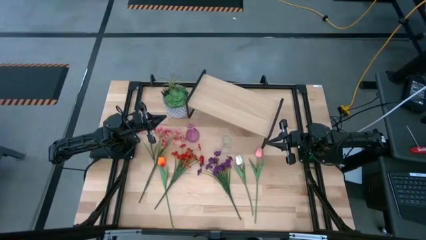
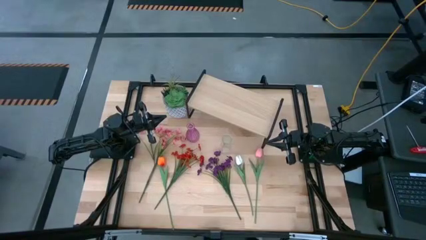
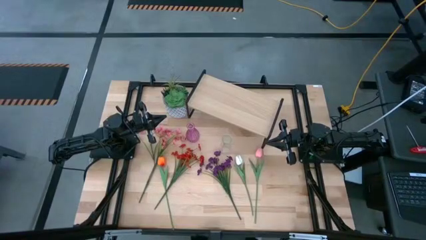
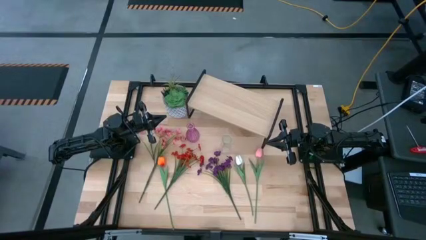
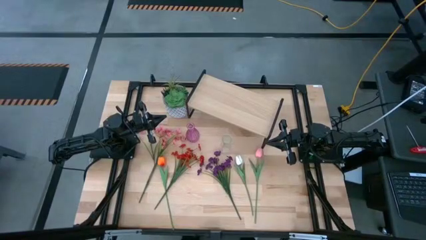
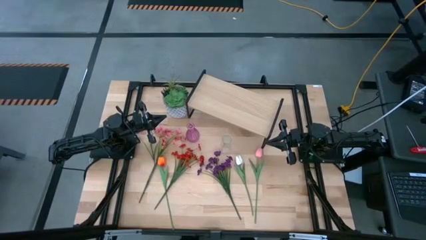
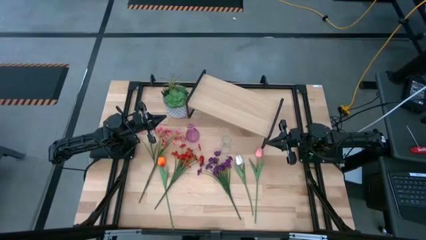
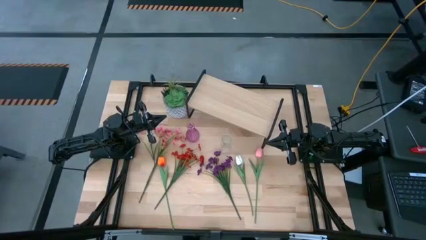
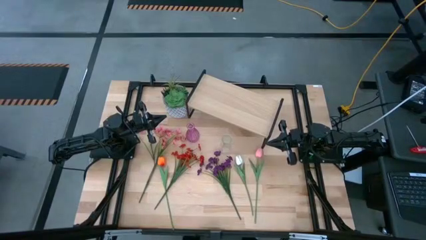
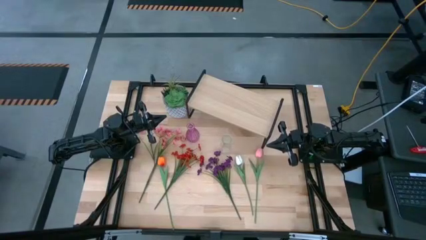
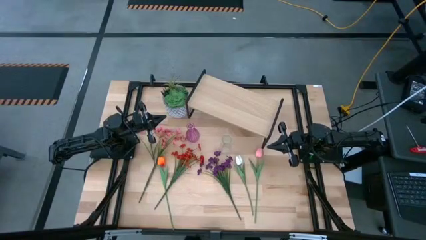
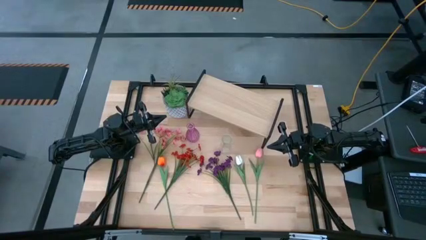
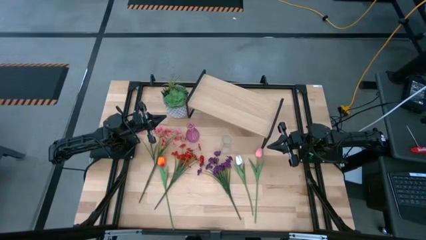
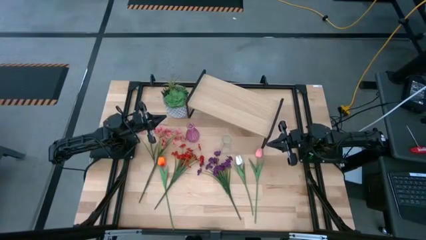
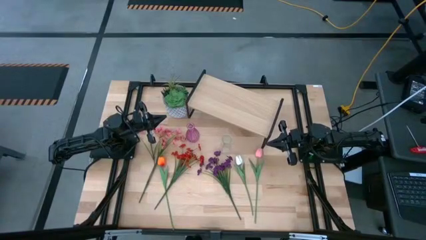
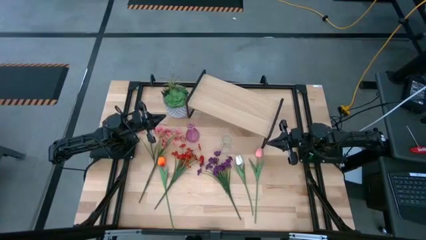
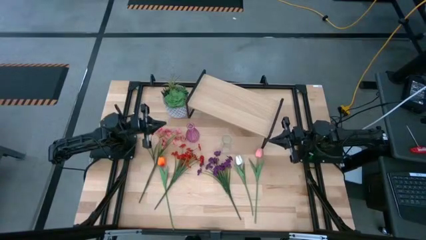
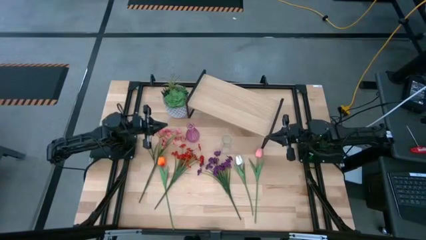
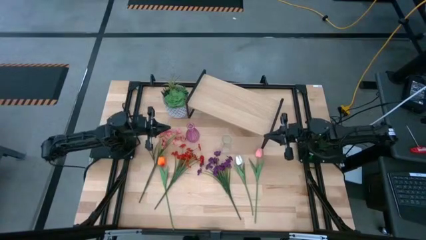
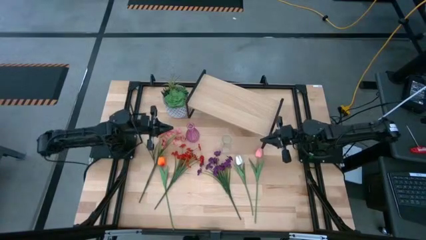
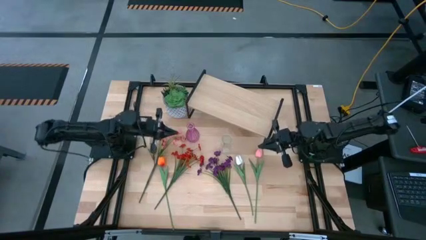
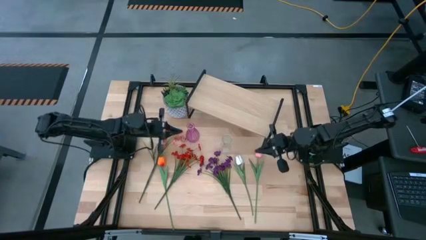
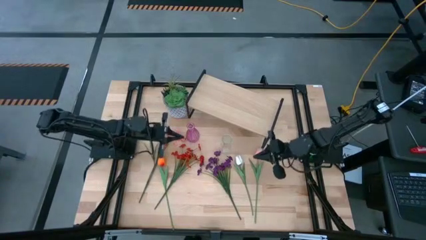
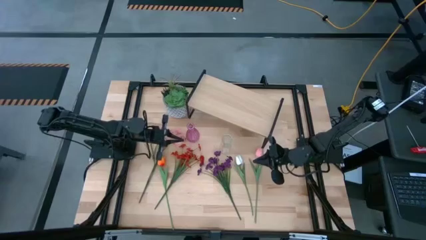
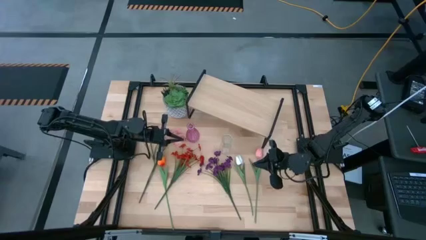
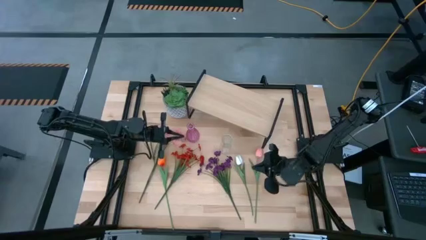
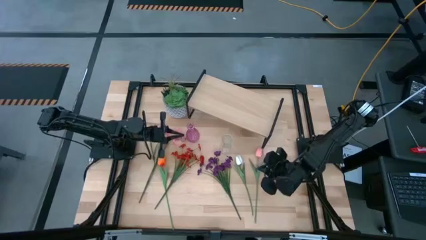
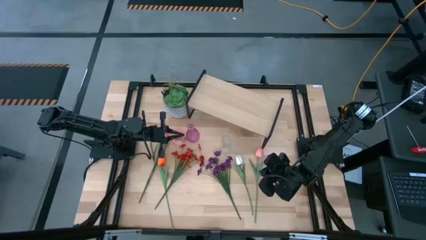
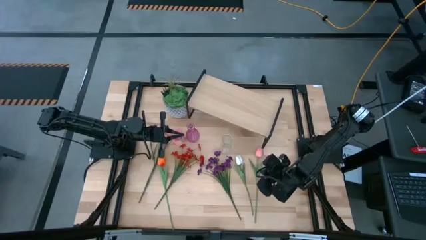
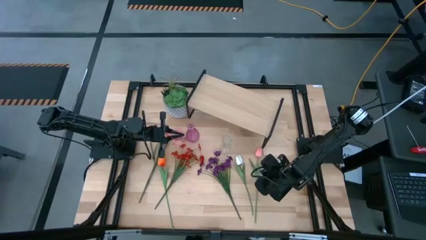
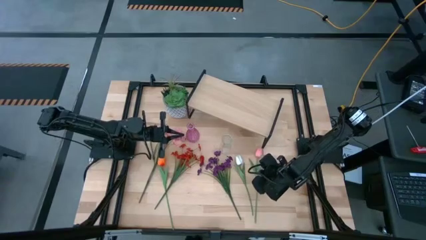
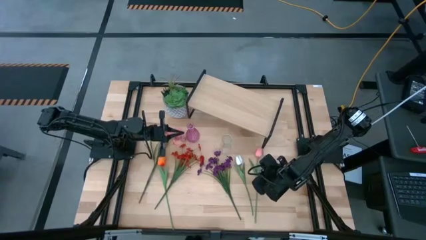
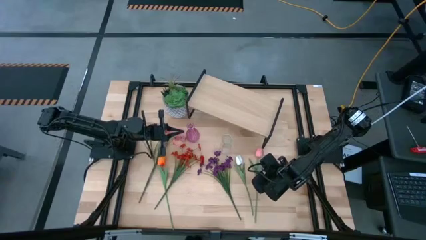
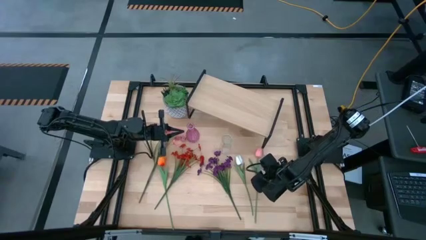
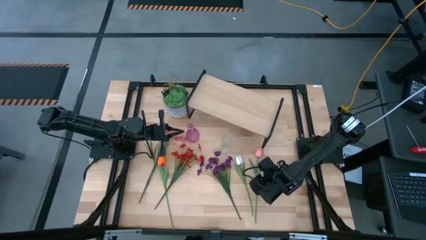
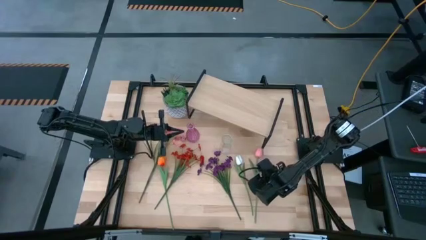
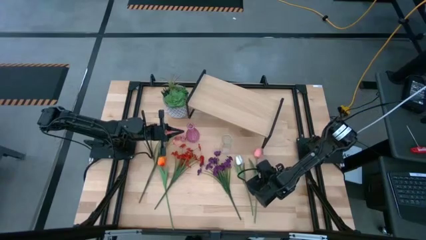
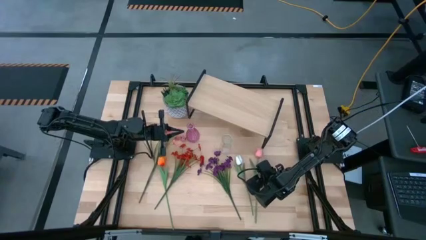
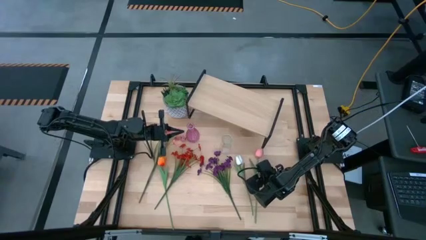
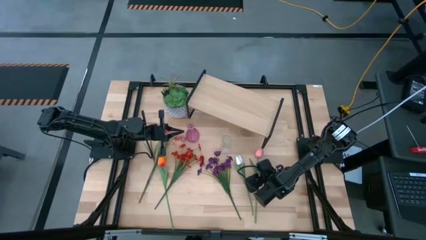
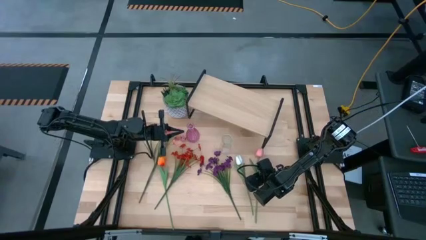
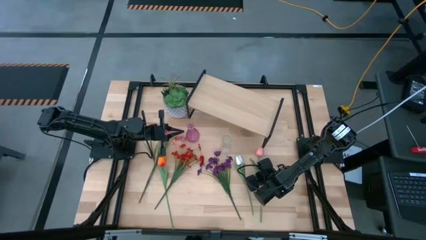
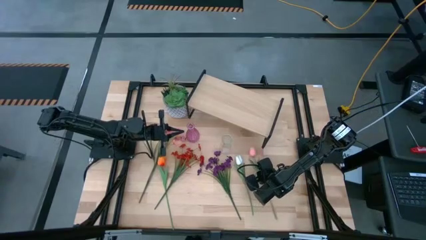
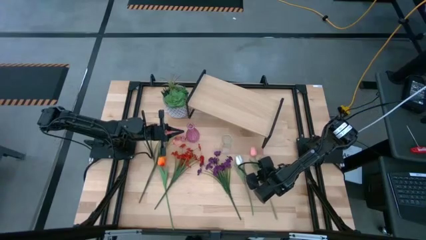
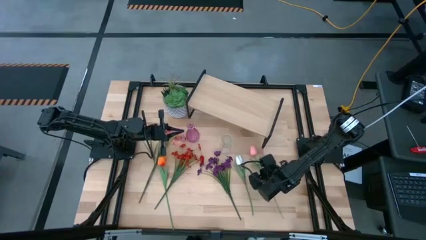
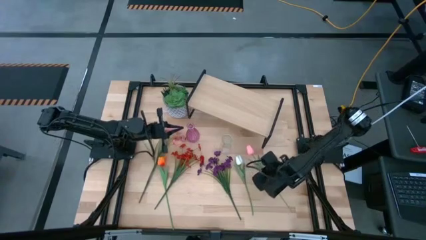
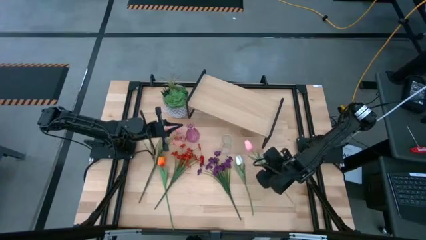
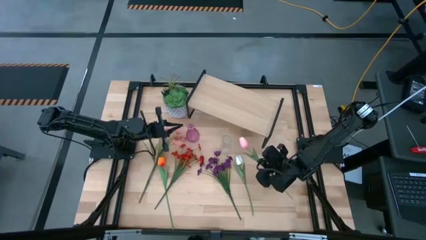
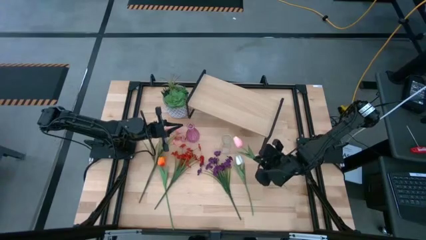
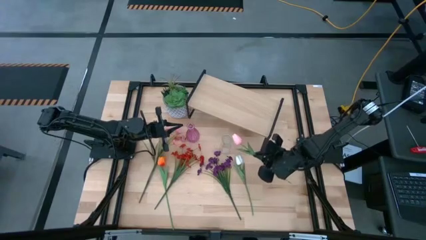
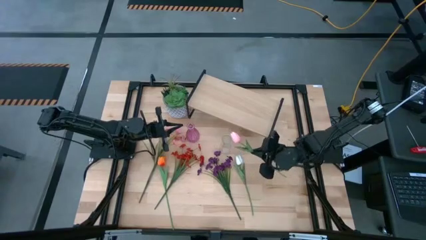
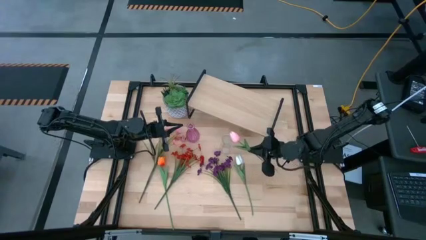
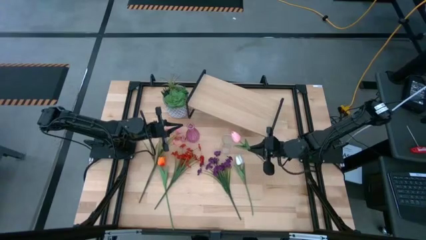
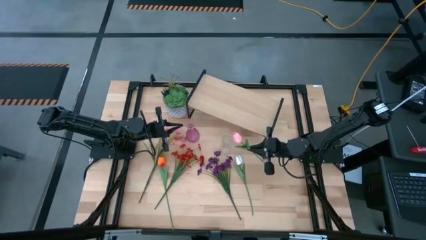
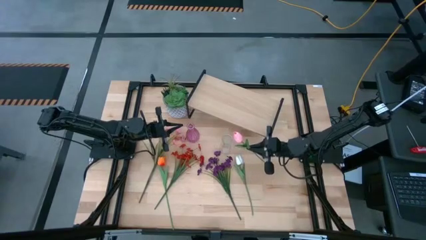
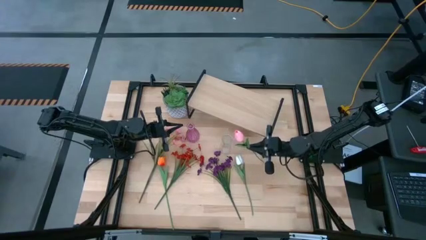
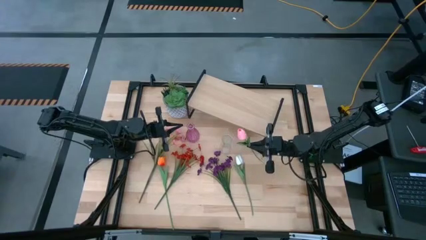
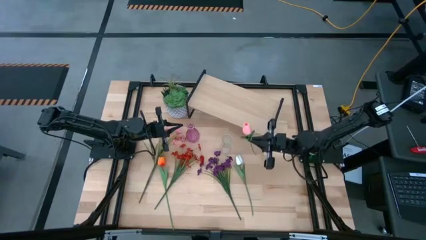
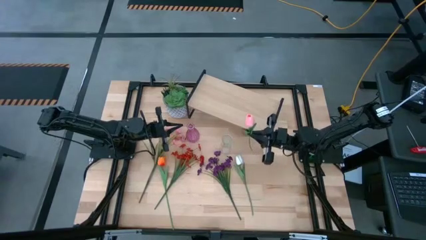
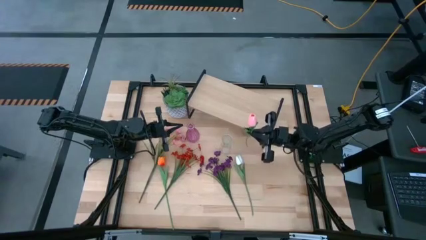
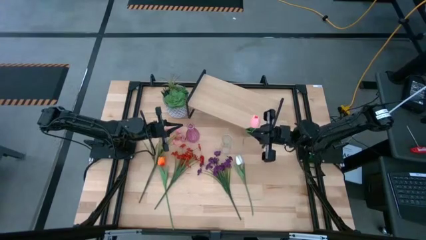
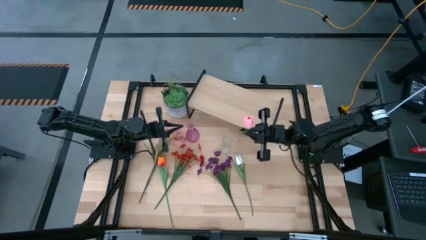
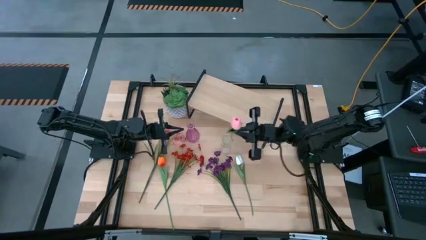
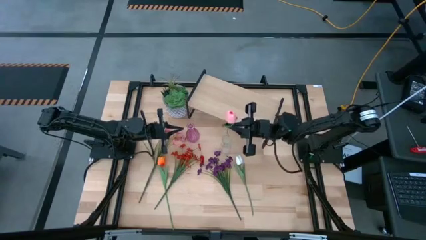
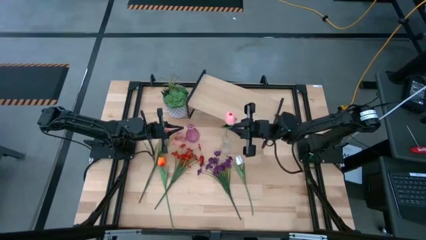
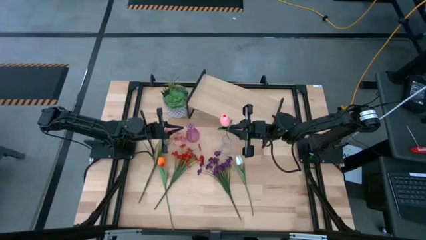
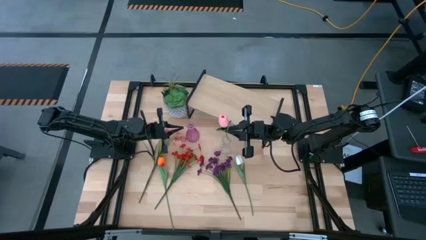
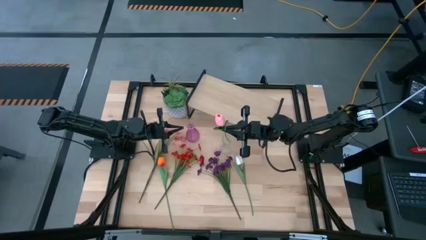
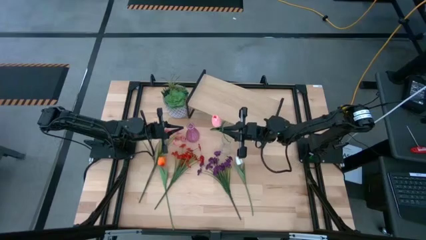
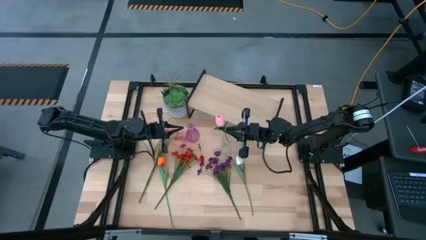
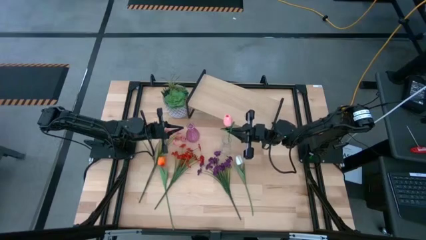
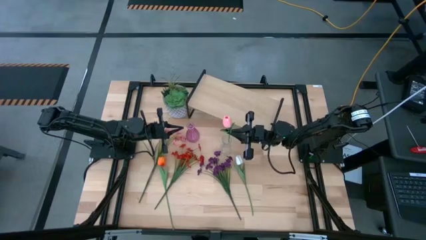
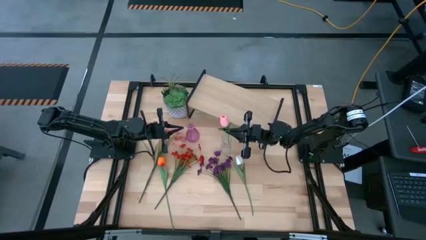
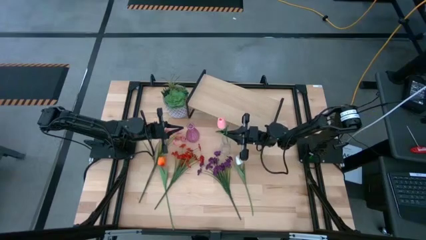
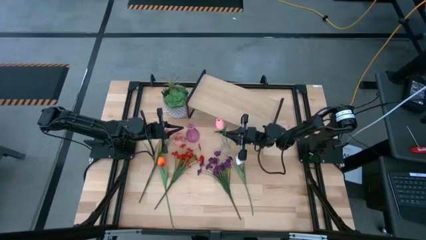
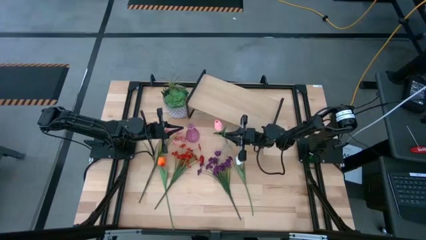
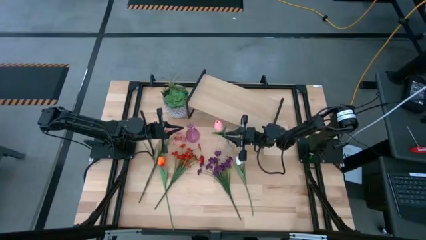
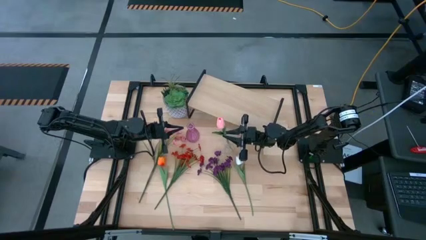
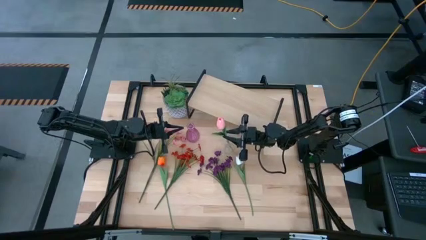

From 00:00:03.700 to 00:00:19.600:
Task: Pick and place flowers into a vace then onto a shelf
Put the pink flower into the transparent vase
